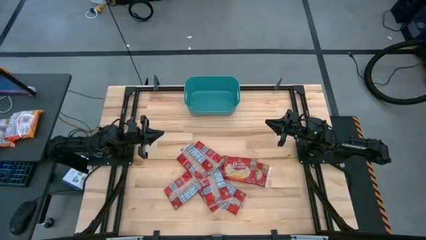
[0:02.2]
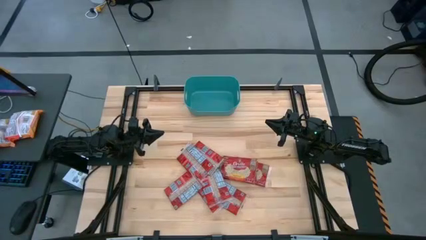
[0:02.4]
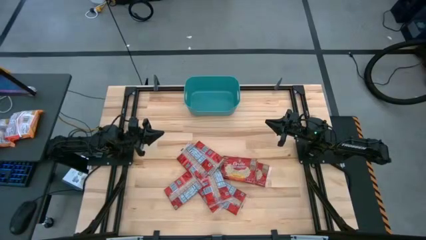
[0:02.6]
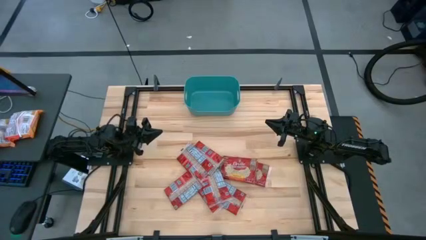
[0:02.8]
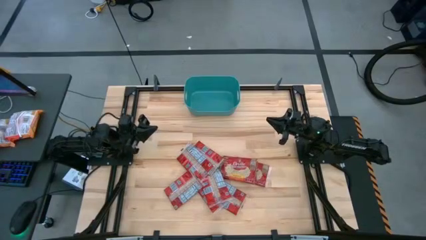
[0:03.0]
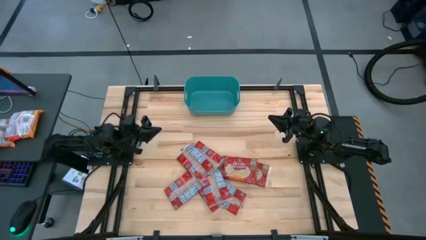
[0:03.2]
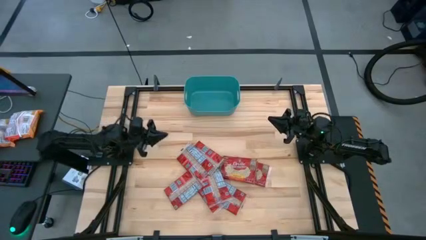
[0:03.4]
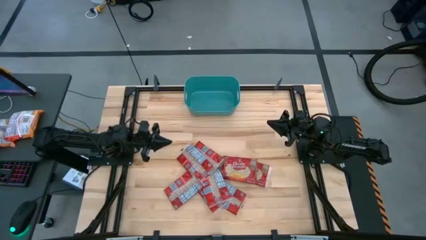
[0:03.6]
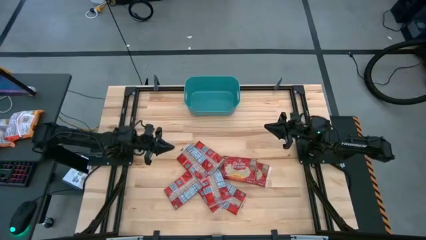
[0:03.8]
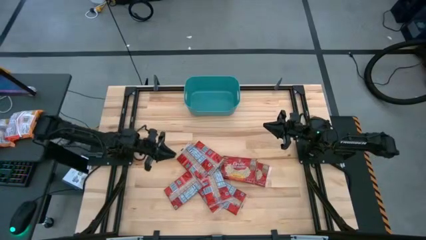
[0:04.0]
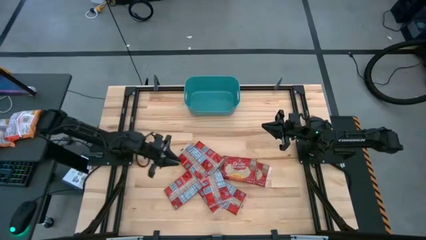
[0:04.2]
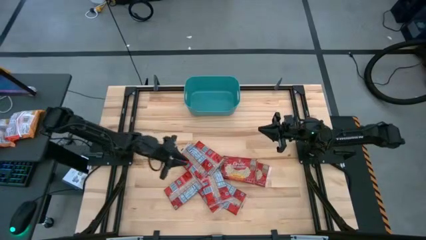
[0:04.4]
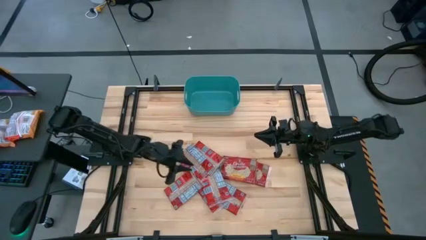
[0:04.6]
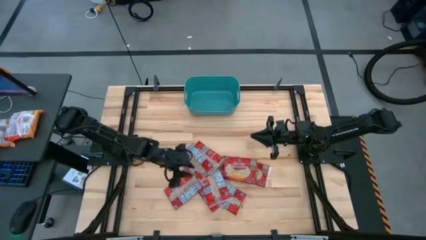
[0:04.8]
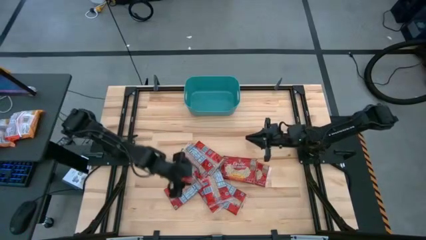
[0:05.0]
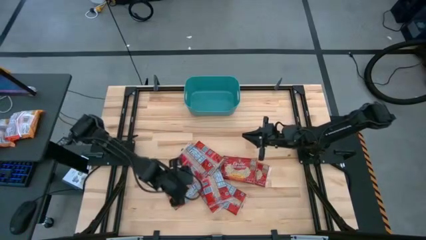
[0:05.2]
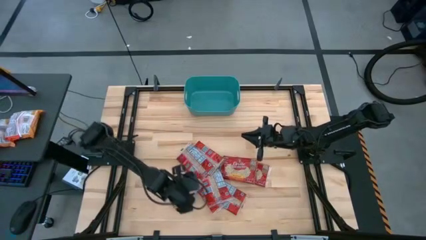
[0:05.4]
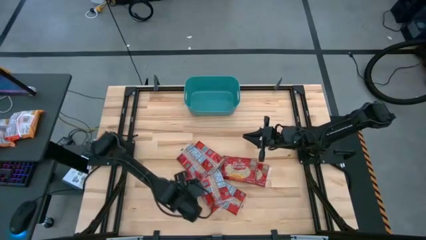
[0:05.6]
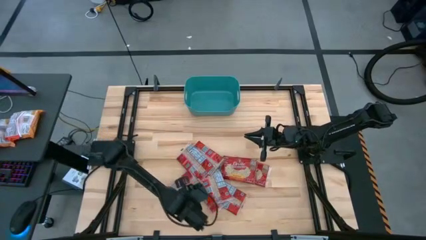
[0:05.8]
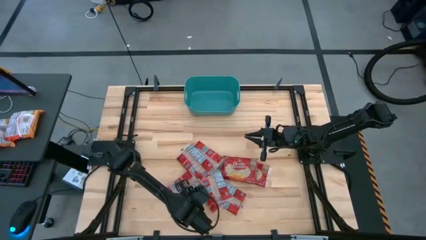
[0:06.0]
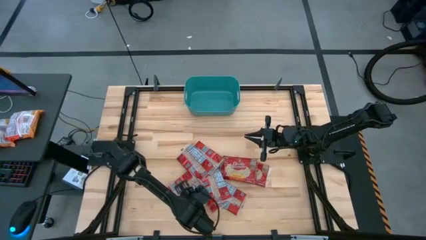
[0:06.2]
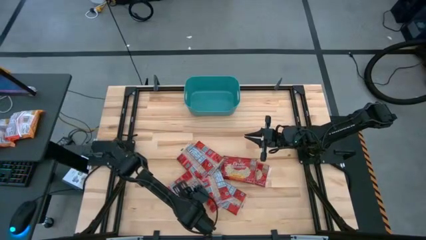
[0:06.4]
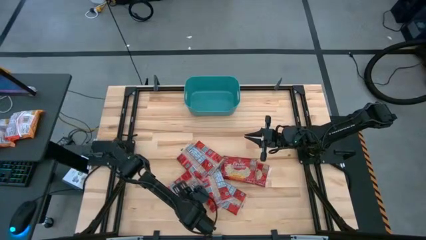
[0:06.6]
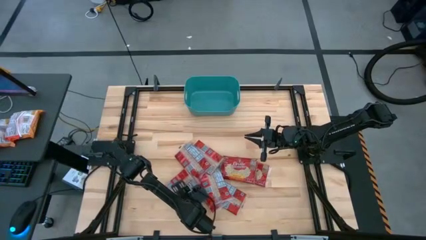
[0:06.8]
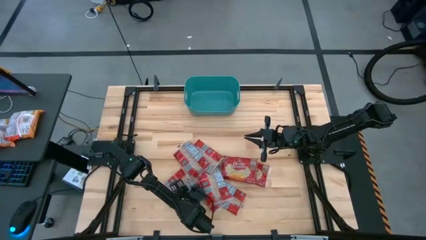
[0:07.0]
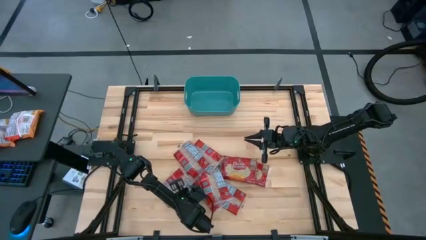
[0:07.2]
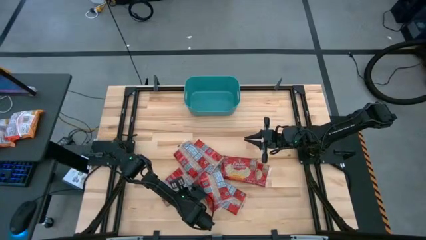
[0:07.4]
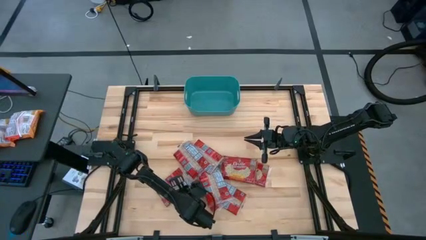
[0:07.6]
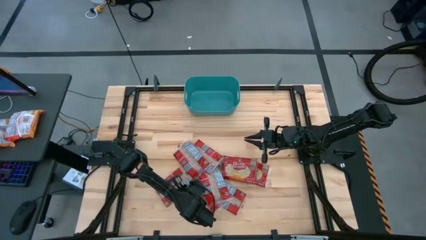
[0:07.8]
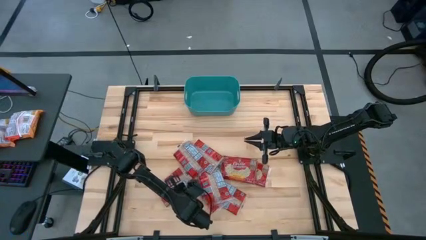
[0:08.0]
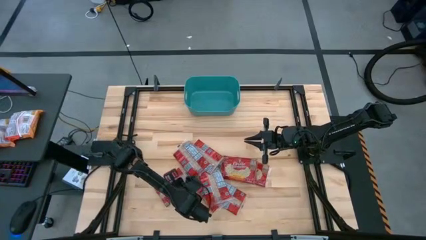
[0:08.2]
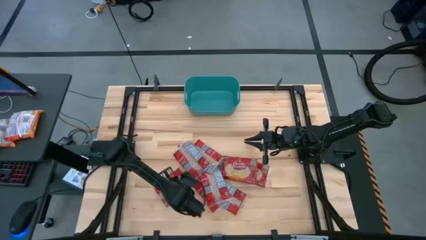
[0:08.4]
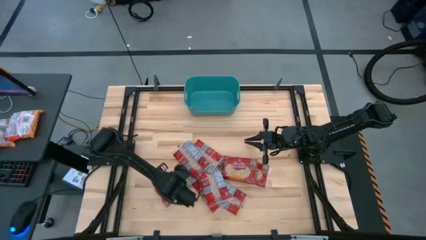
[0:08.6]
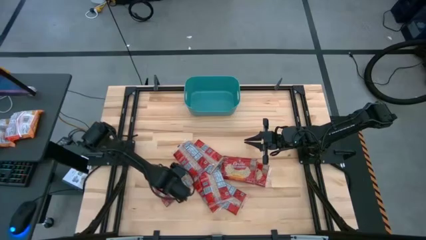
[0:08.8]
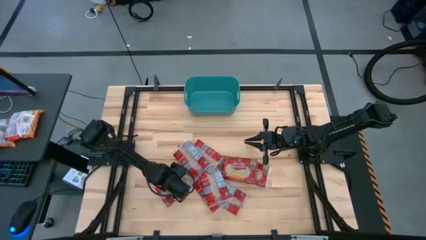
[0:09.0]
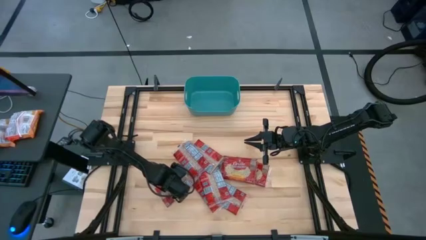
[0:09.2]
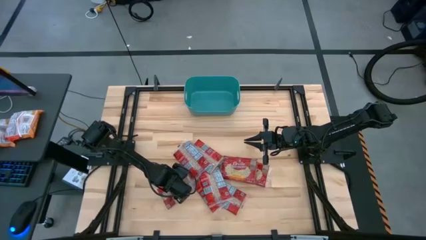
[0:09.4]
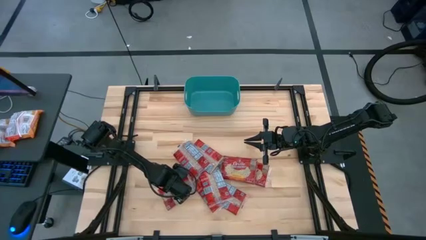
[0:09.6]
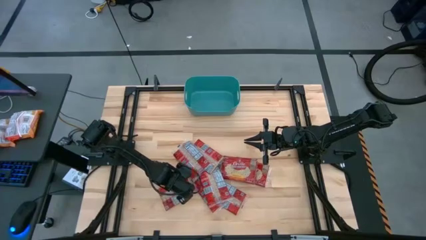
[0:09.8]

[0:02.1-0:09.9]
Task: Sort popcorn bags into baskets
Put the popcorn bag into the green bin

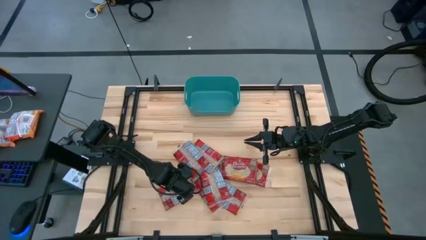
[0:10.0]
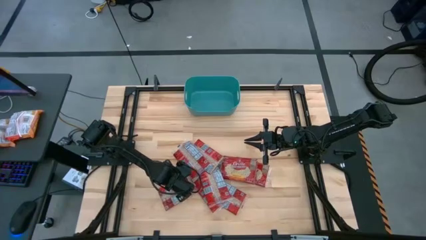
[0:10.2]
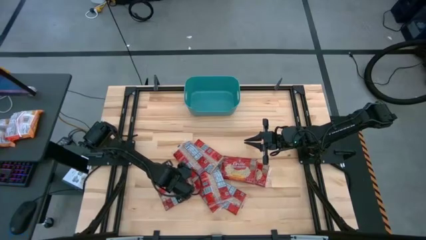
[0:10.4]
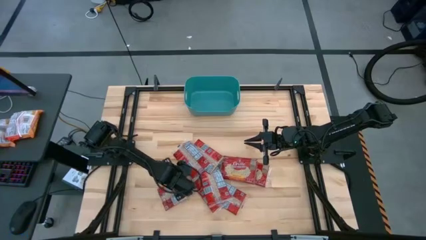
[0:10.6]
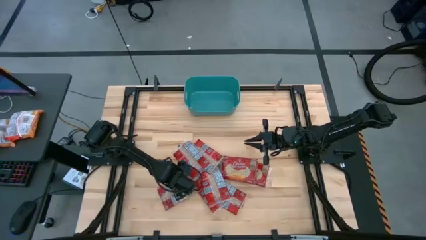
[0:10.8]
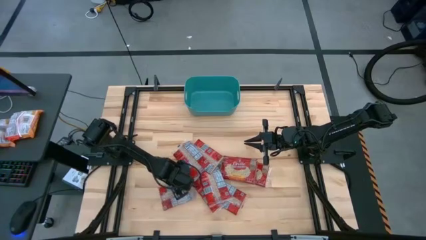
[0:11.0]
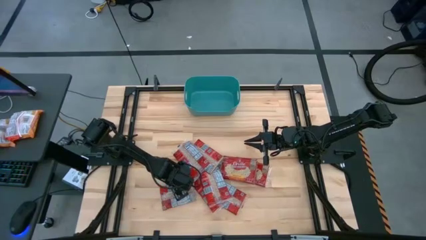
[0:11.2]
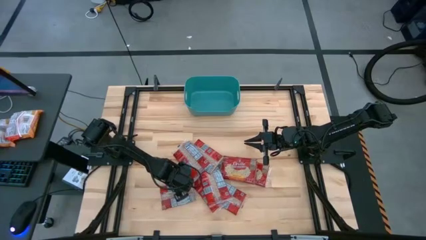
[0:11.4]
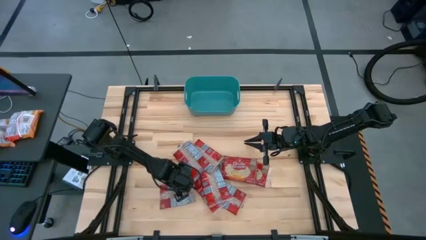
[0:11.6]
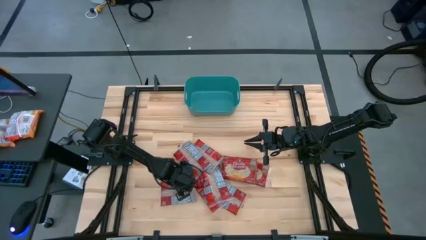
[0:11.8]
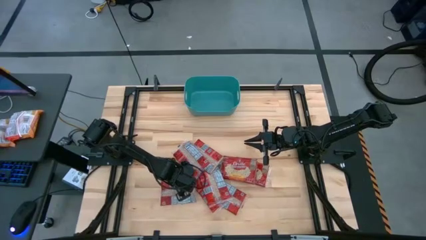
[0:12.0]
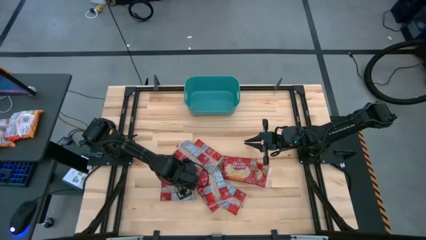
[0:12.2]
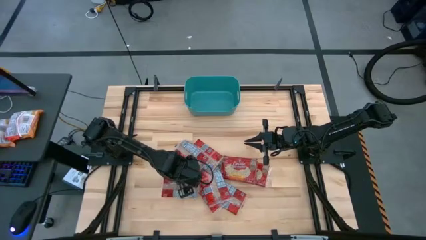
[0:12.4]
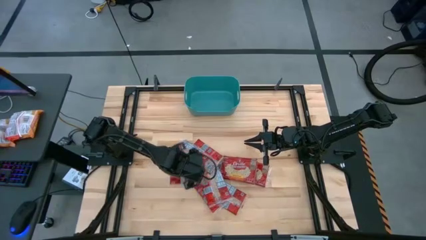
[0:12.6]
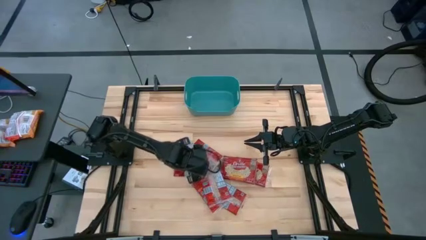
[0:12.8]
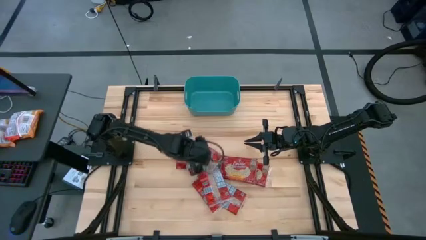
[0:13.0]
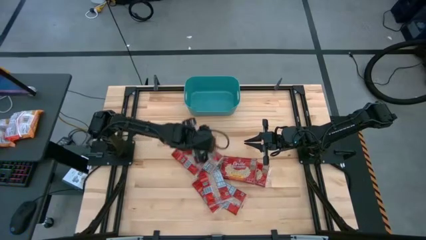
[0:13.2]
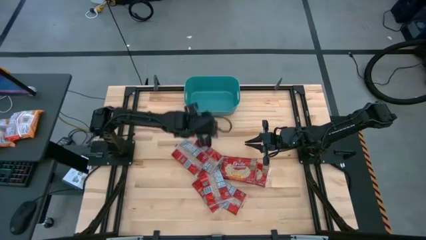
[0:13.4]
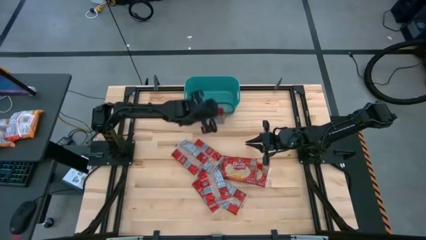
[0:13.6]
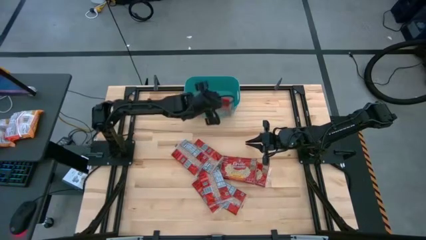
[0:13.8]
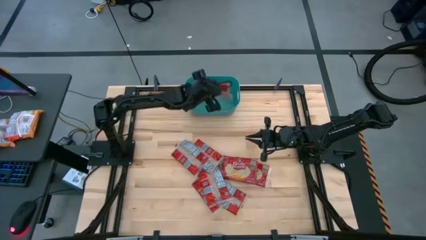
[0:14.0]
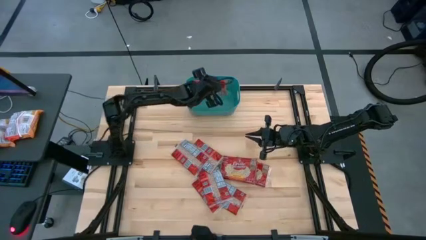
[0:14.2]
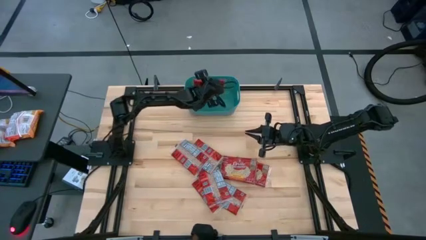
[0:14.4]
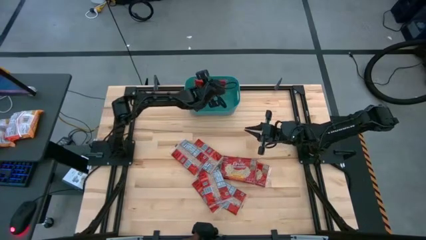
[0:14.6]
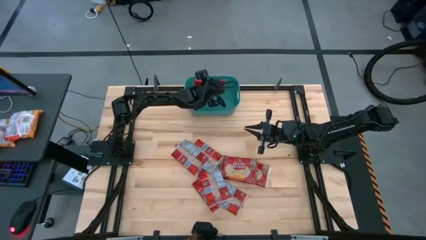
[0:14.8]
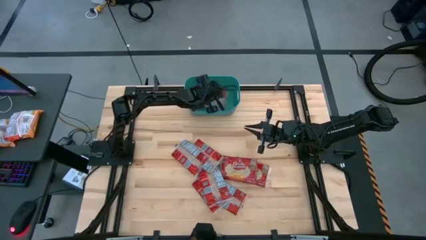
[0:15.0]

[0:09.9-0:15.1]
Put the popcorn bag into the green bin

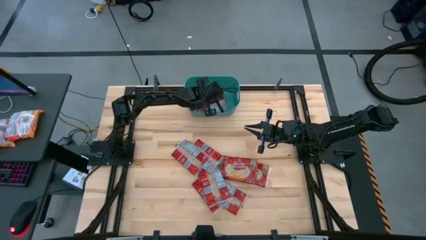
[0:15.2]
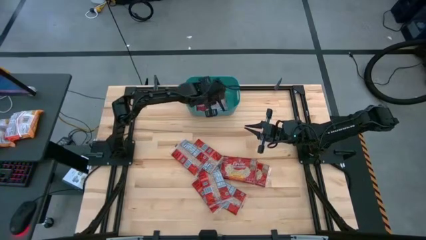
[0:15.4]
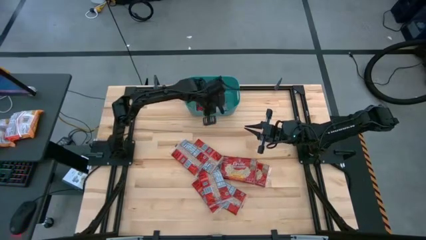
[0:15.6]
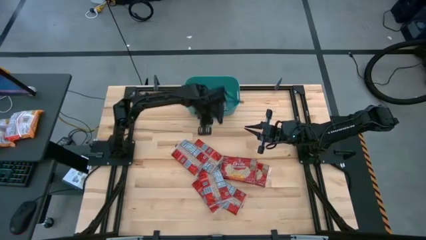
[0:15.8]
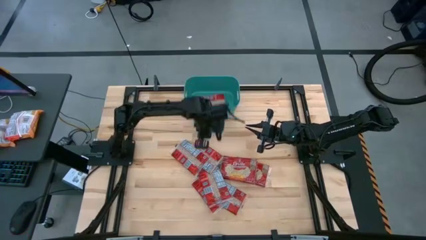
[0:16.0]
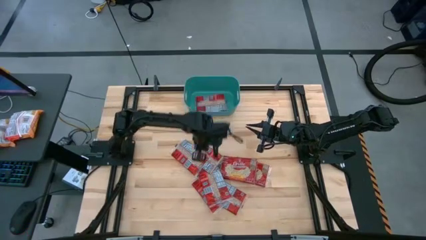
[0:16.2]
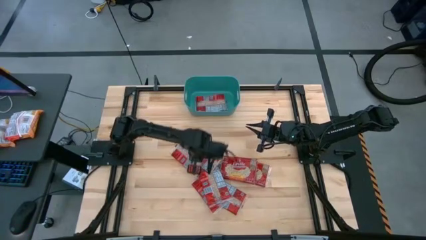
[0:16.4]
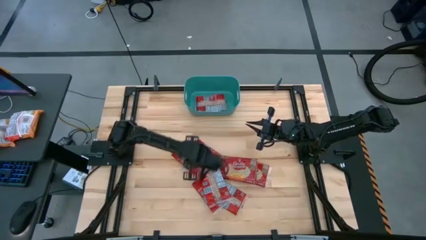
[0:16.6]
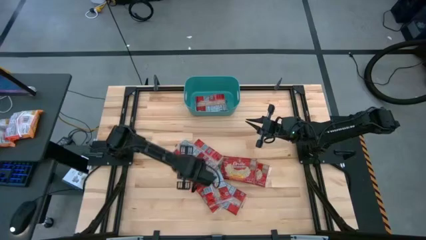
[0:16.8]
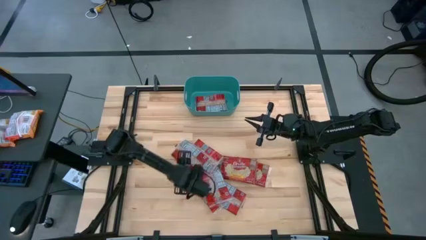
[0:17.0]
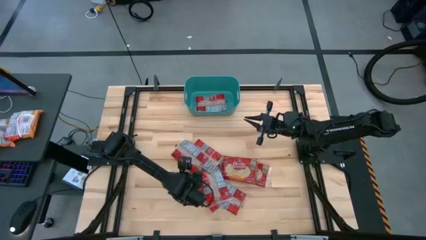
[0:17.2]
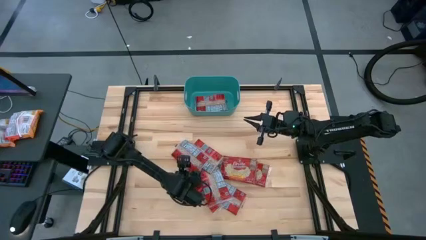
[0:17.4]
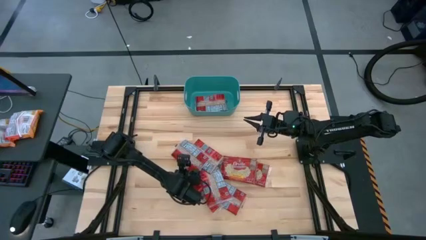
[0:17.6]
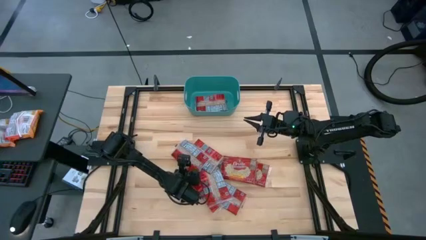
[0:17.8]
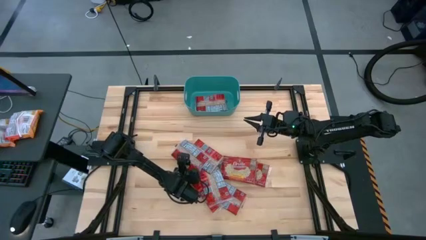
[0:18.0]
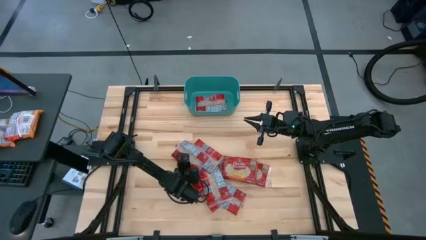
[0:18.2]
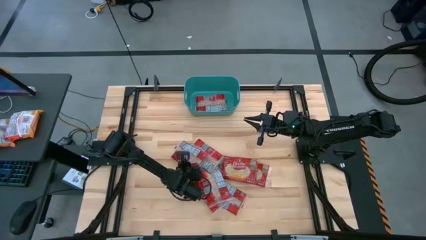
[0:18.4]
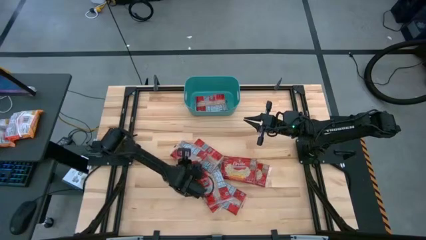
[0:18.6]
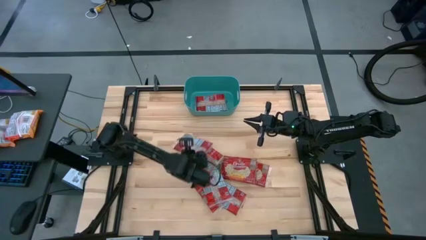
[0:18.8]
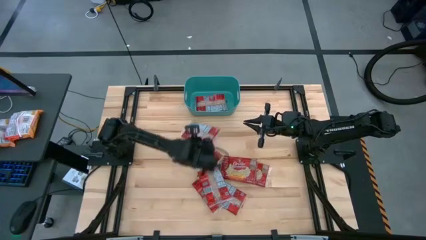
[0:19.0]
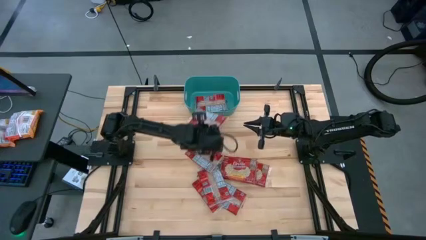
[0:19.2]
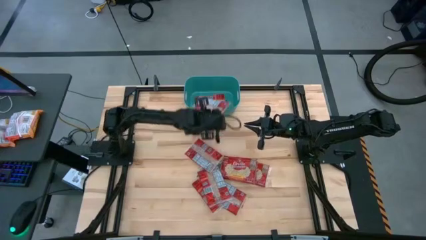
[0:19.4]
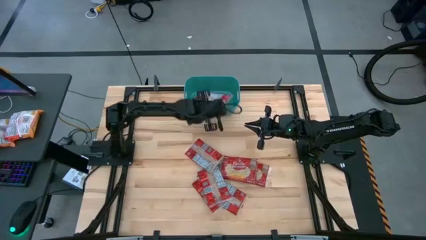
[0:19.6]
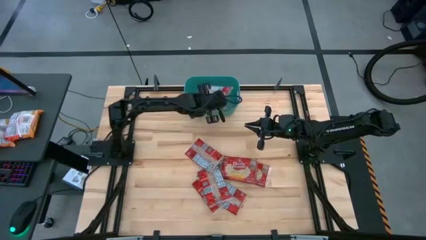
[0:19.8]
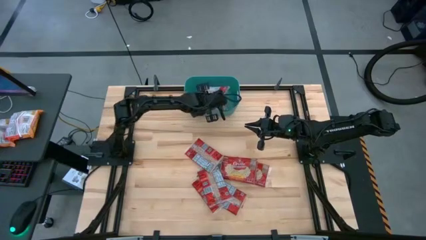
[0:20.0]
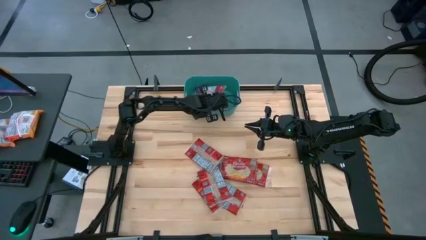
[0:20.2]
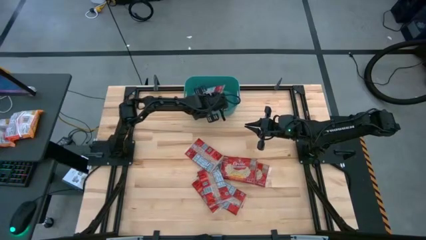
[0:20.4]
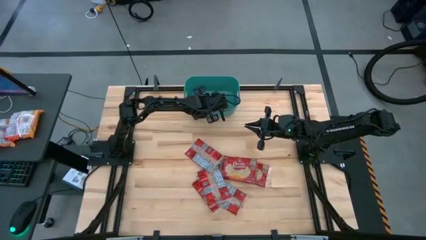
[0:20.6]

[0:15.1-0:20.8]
Put the popcorn bag into the green bin
